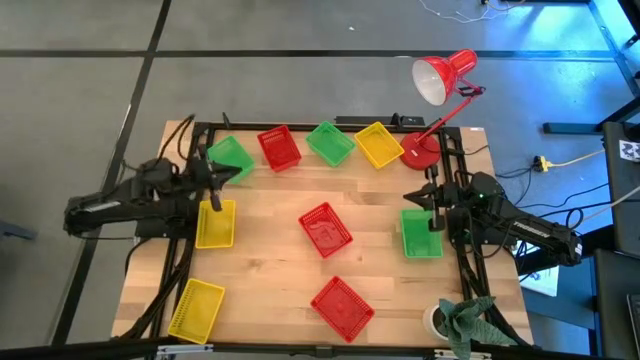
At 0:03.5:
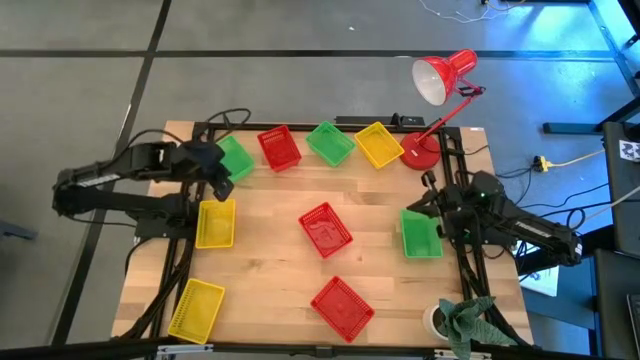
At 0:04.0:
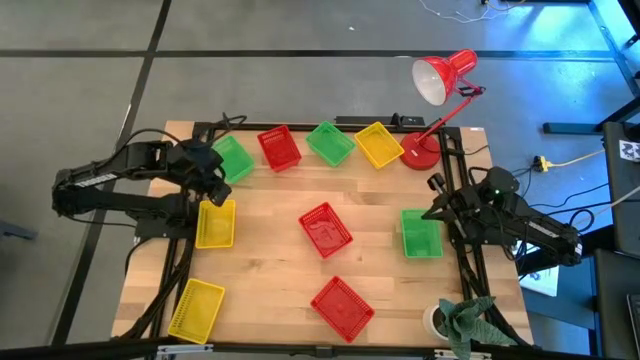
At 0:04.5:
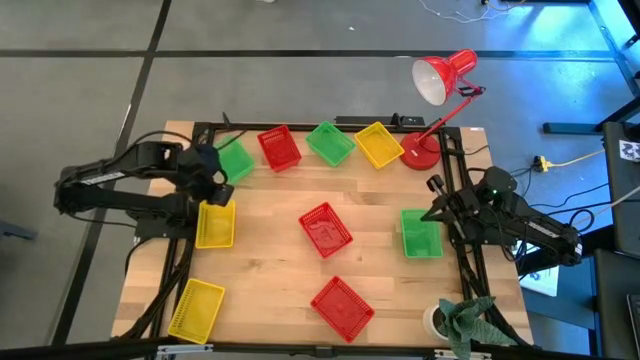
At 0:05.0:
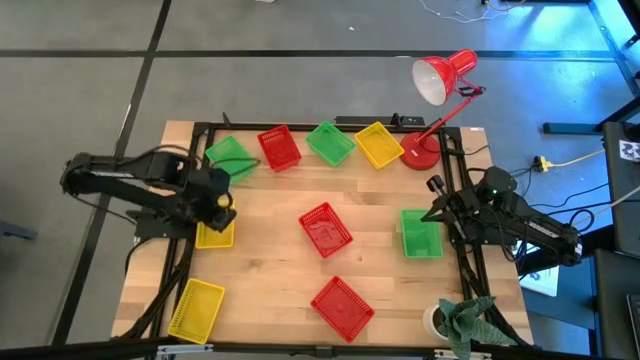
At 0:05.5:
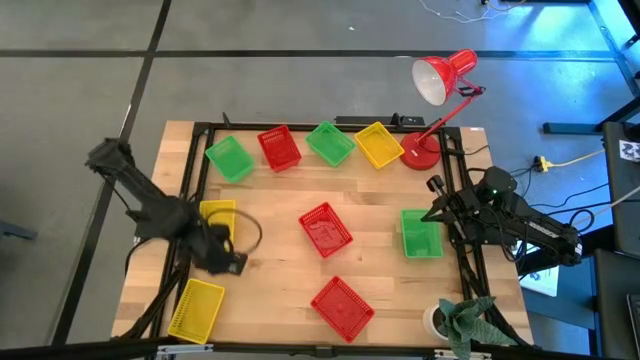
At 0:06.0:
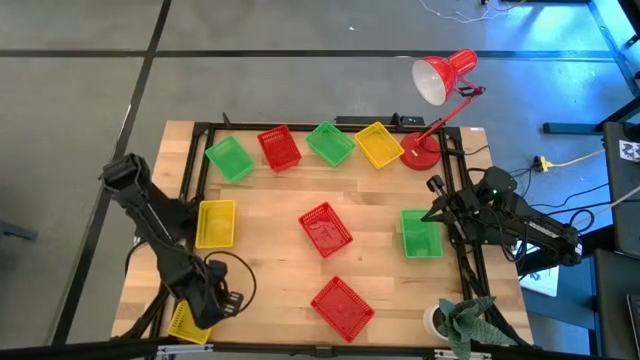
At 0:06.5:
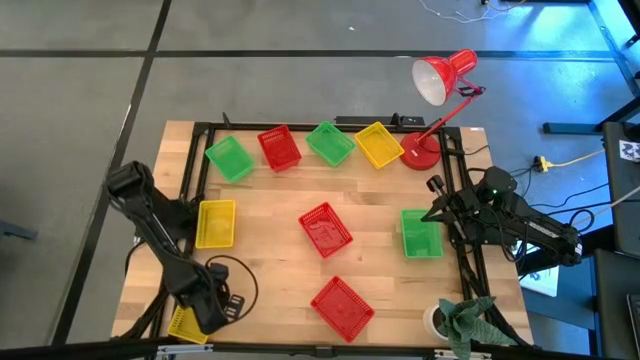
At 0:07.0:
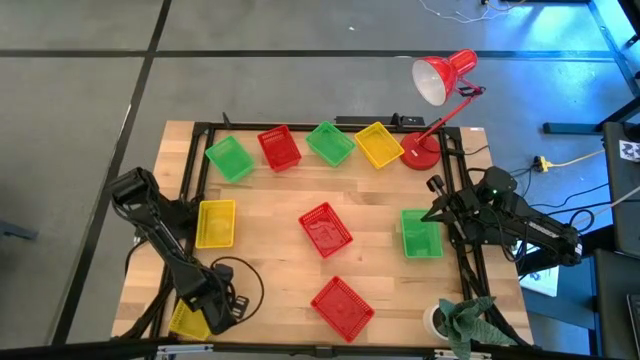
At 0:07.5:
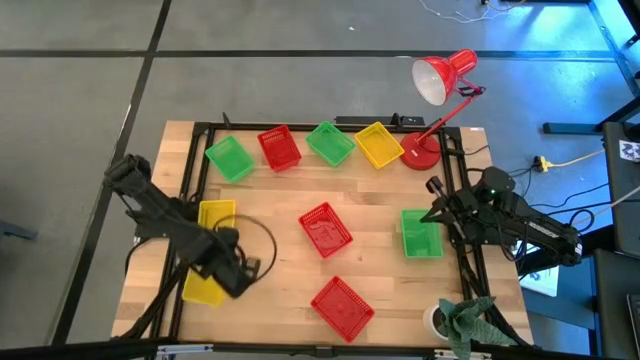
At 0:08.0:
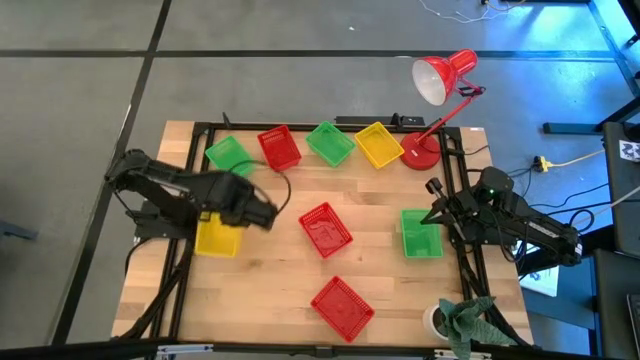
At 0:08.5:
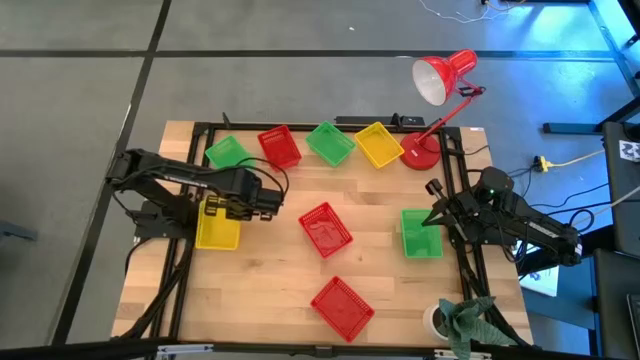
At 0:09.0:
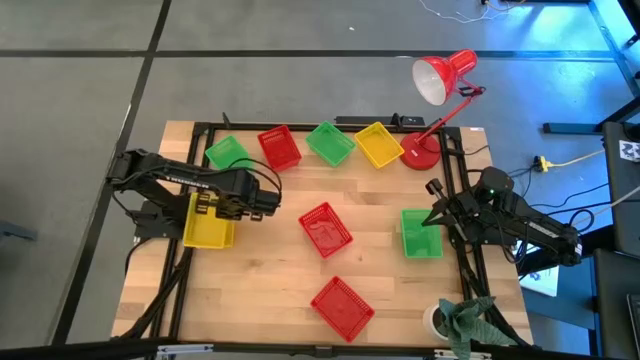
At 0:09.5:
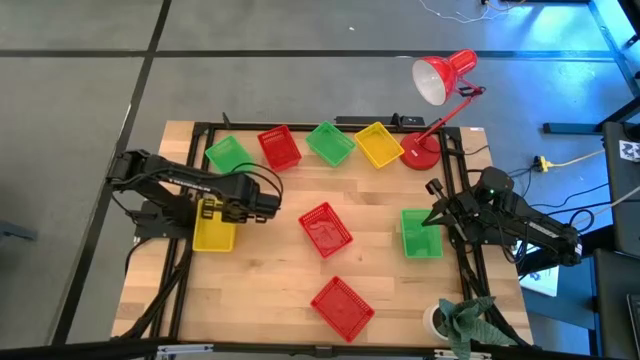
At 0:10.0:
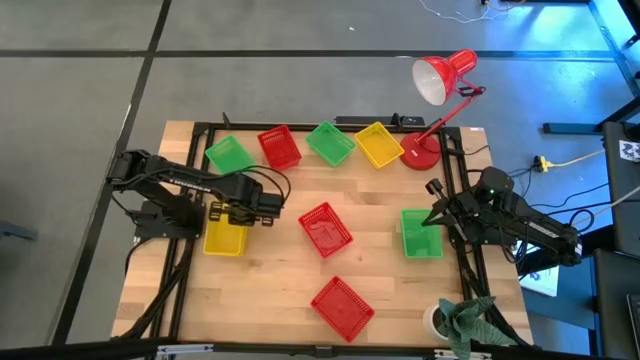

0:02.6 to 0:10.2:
Stack the bottom yellow bin on the center yellow bin

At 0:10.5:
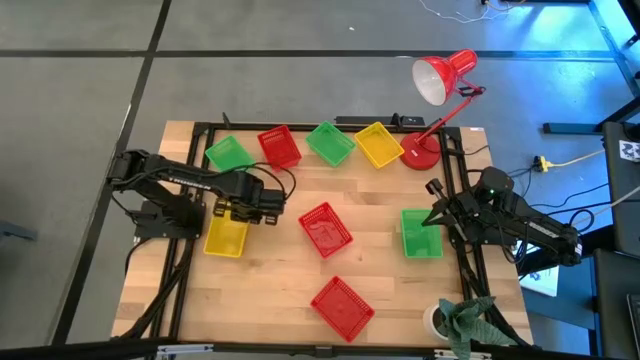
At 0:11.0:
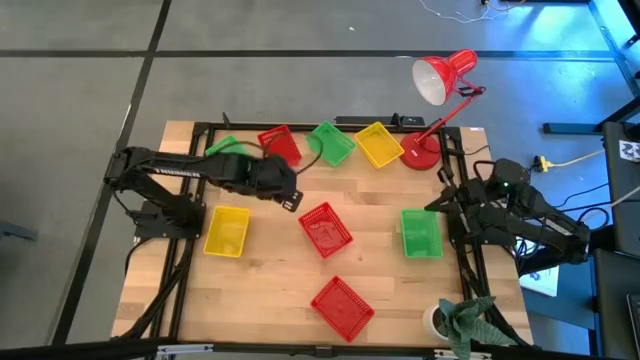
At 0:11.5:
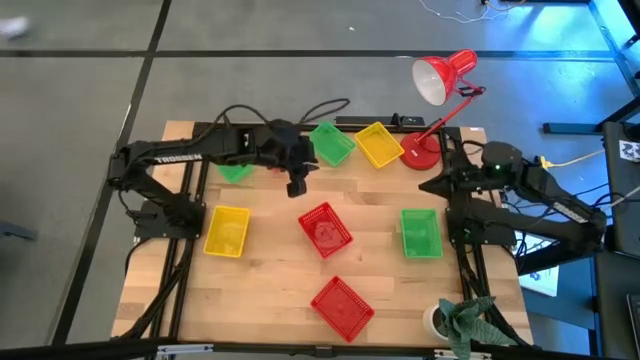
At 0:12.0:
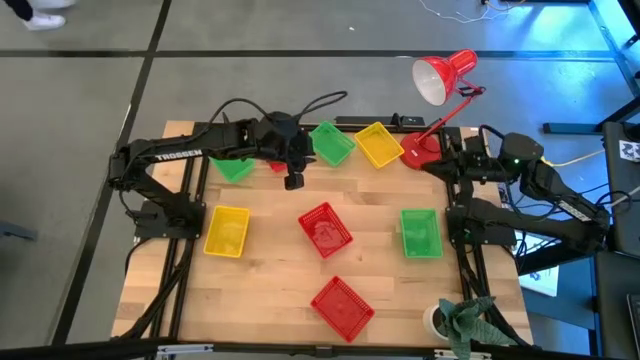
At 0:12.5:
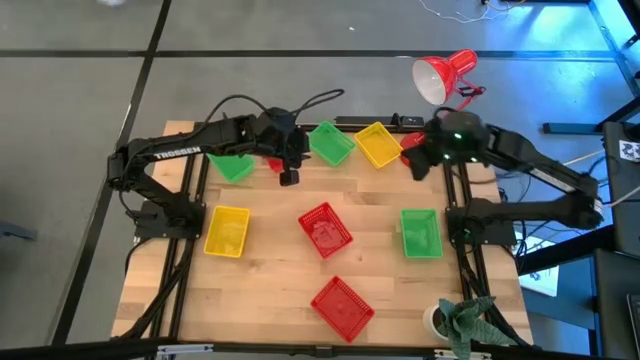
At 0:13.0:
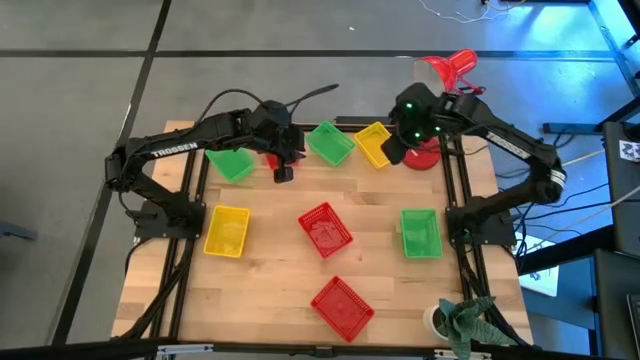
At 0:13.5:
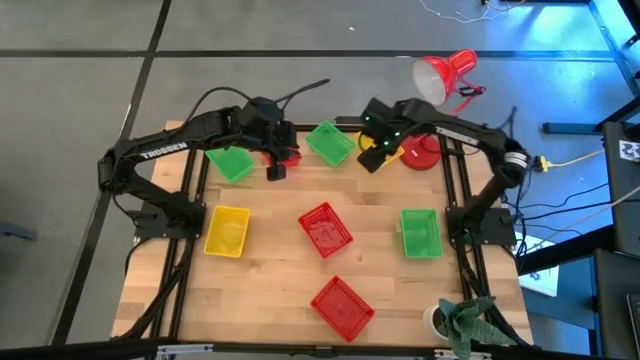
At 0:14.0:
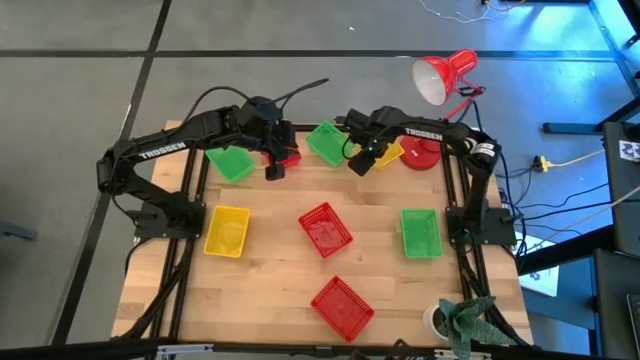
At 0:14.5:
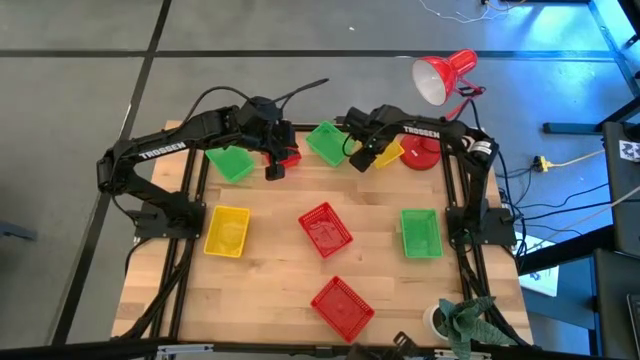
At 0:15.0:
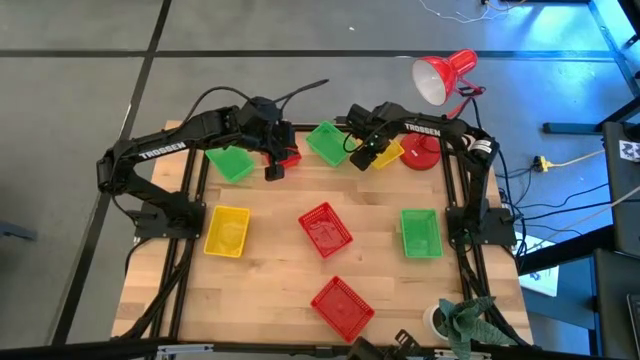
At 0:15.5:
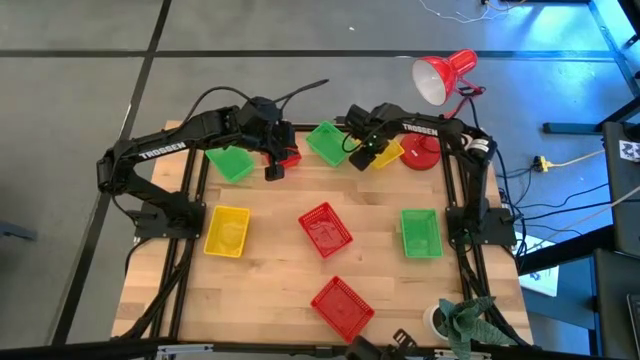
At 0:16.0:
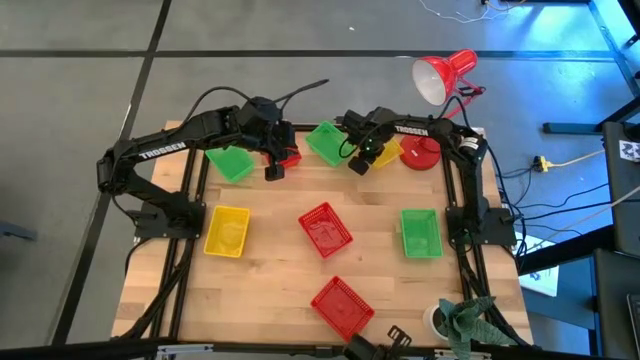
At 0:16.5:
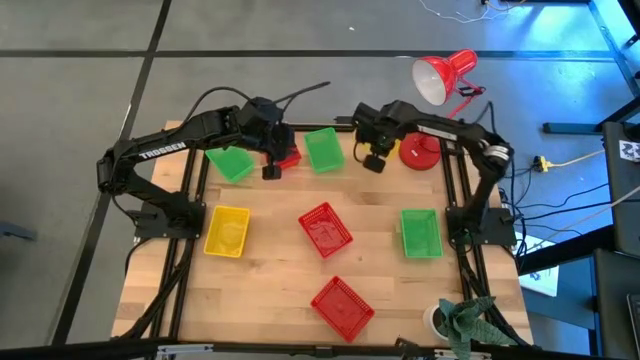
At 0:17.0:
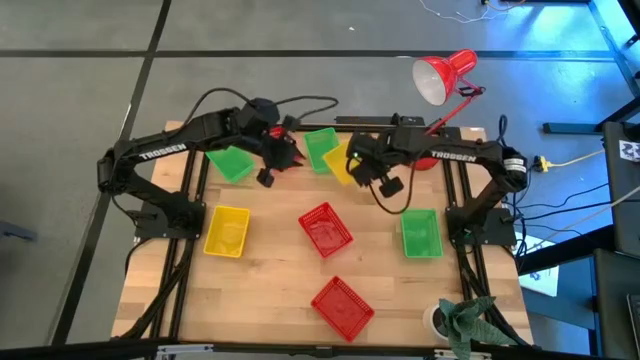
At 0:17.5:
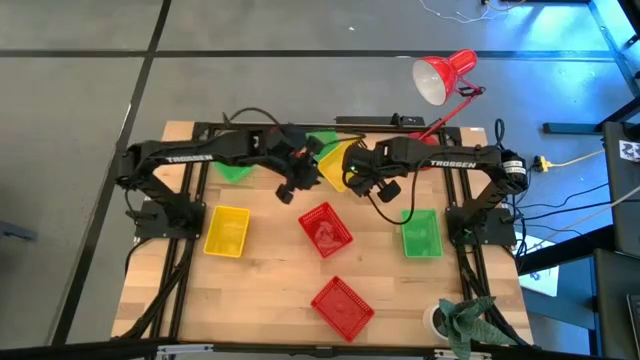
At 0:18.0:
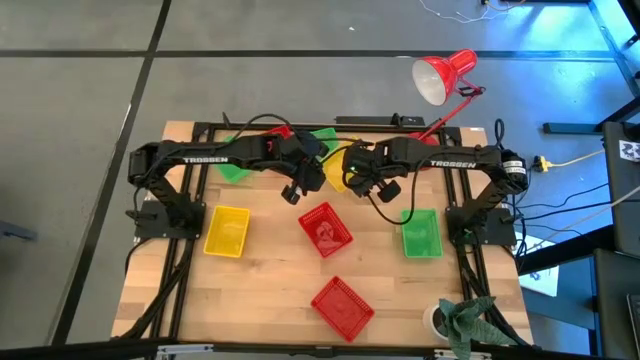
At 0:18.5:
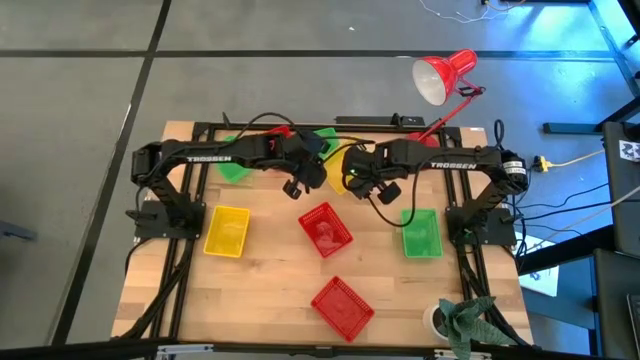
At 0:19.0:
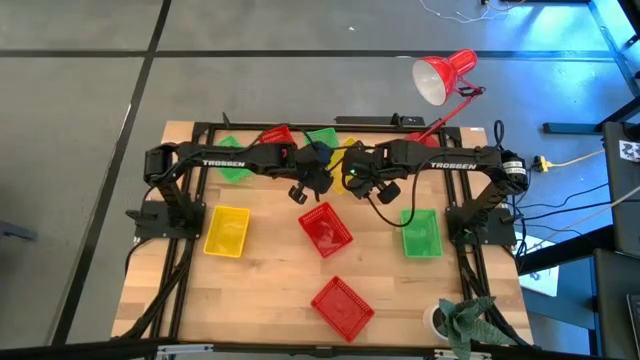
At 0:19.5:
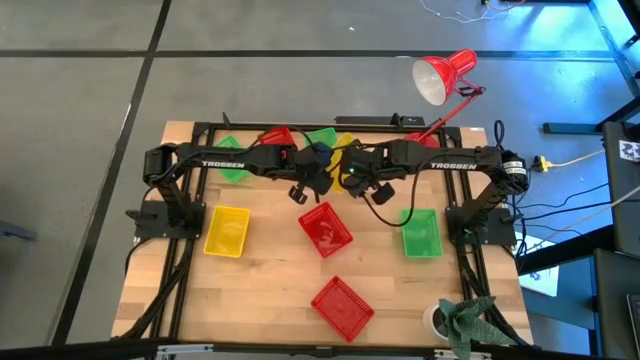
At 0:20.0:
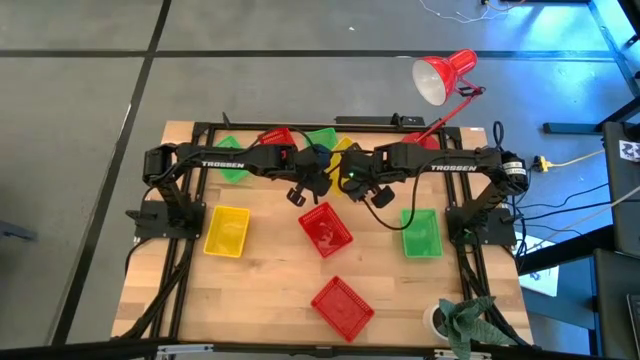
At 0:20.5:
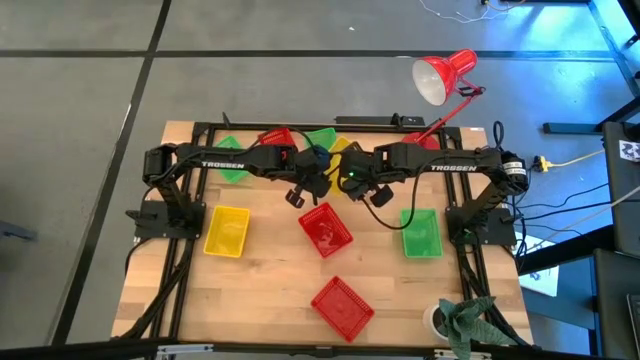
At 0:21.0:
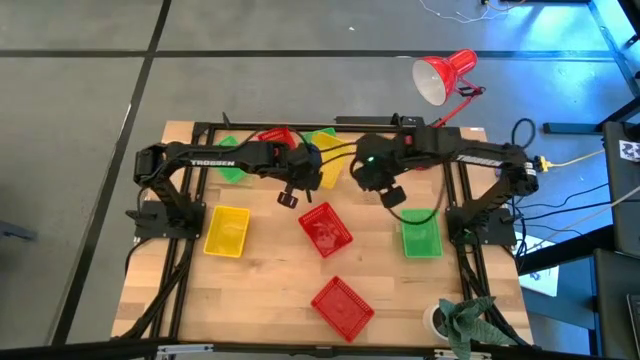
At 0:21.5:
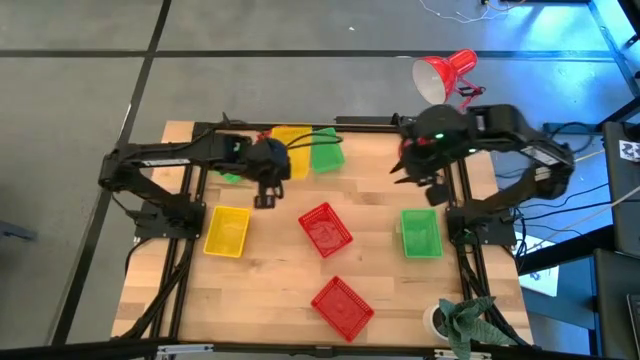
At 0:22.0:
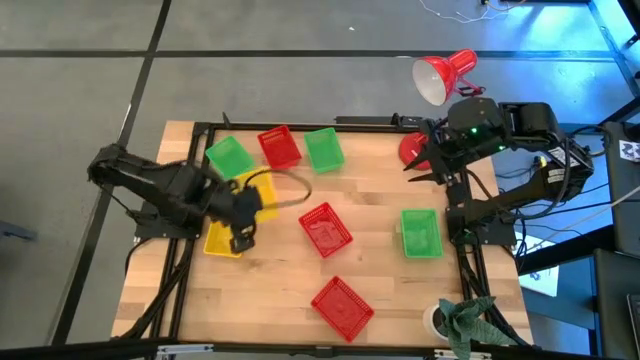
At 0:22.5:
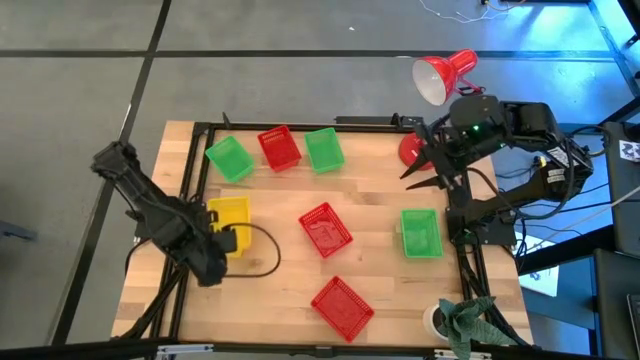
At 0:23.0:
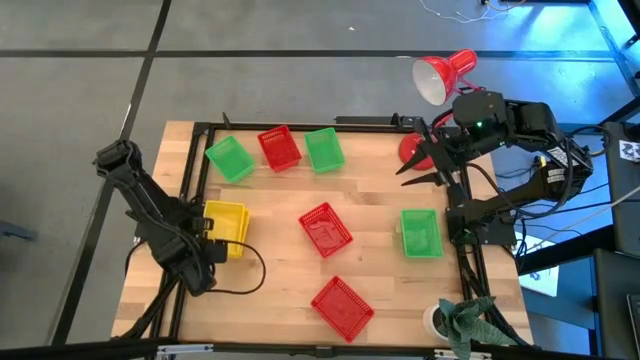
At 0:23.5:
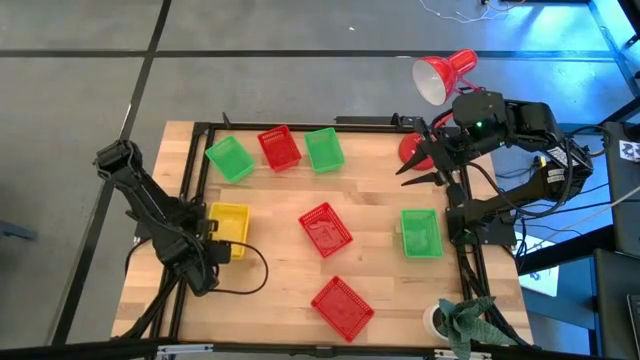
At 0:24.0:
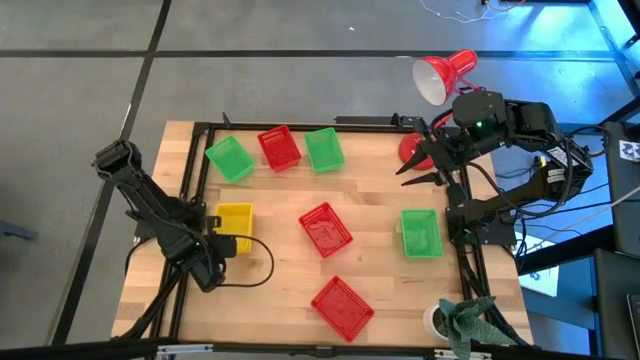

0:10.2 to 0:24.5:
Stack the top yellow bin on the yellow bin
